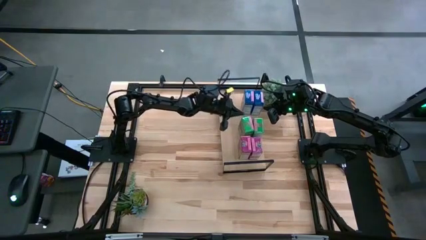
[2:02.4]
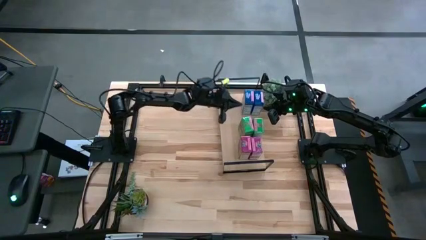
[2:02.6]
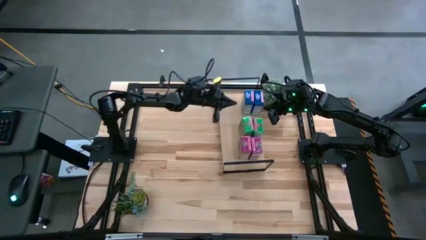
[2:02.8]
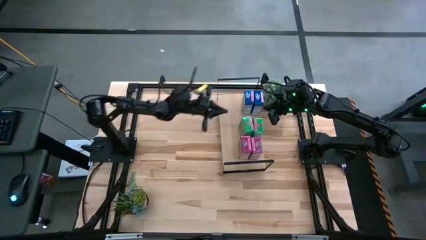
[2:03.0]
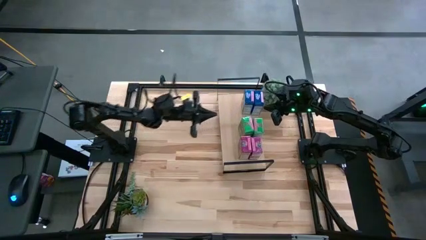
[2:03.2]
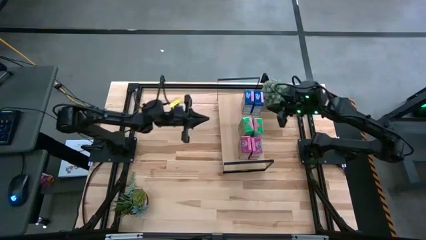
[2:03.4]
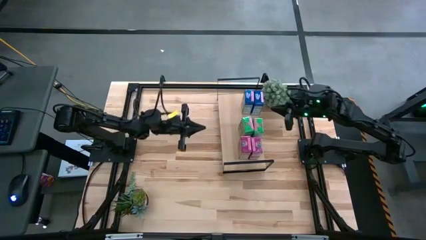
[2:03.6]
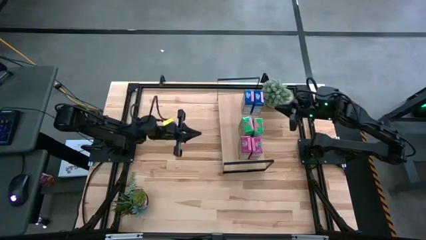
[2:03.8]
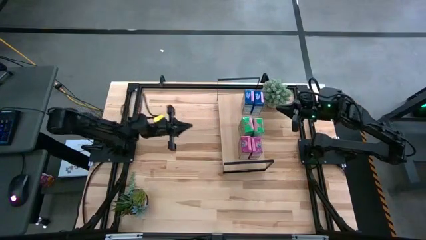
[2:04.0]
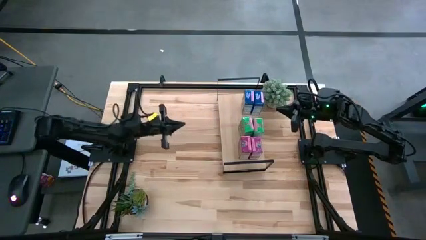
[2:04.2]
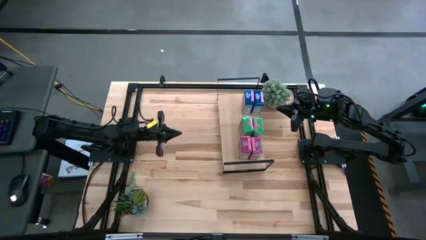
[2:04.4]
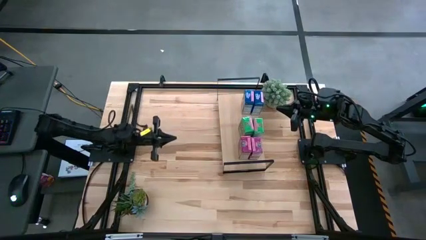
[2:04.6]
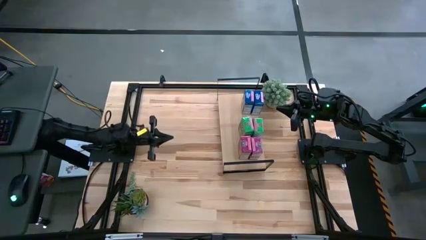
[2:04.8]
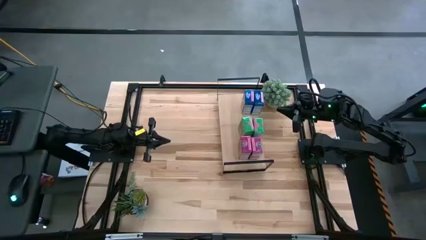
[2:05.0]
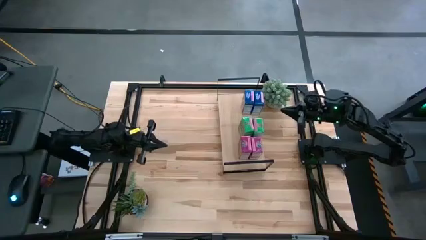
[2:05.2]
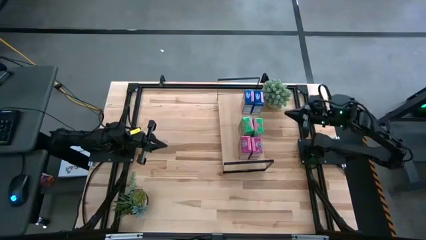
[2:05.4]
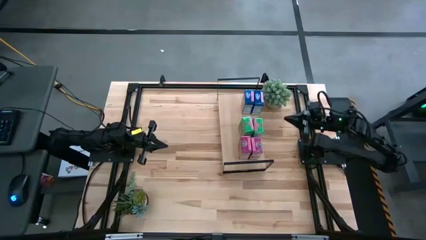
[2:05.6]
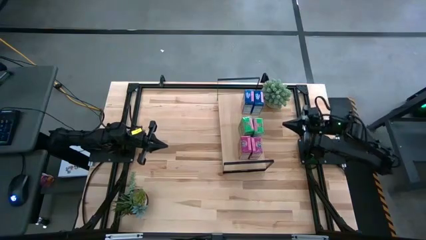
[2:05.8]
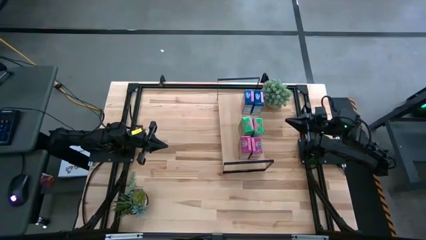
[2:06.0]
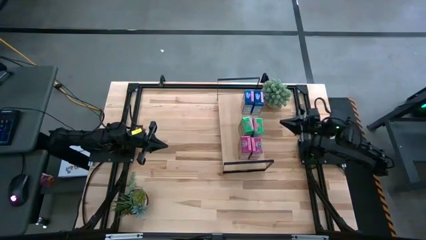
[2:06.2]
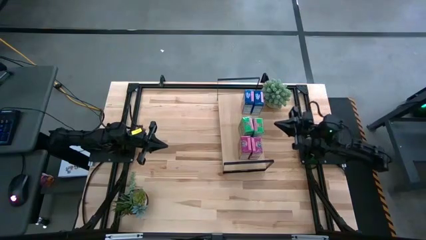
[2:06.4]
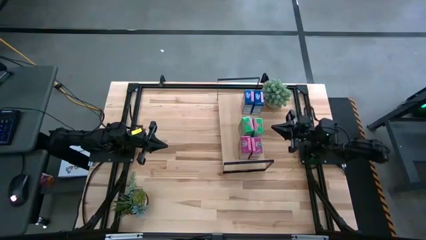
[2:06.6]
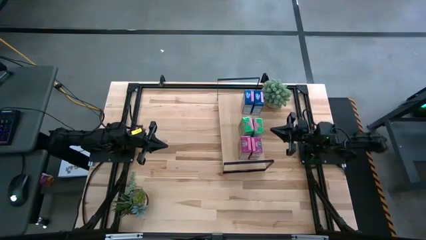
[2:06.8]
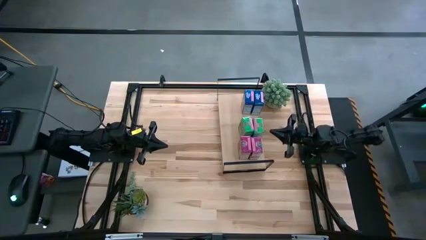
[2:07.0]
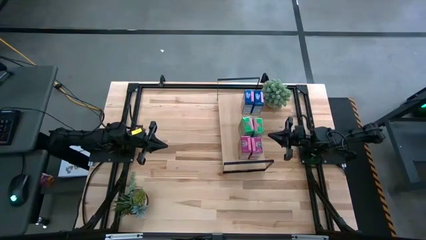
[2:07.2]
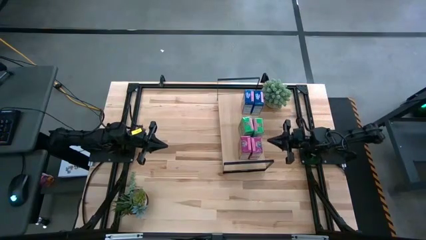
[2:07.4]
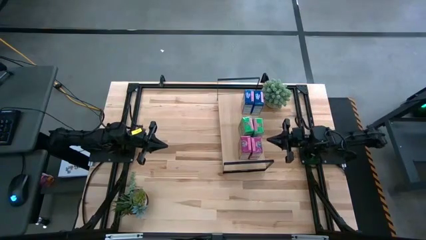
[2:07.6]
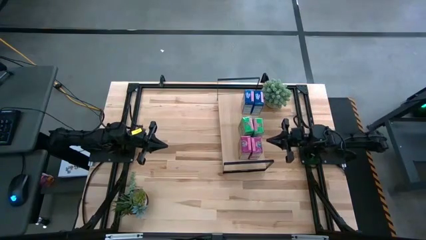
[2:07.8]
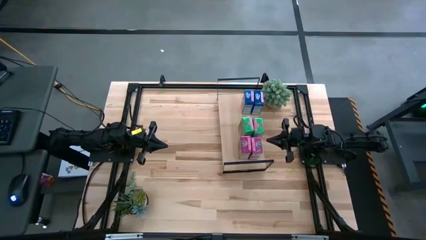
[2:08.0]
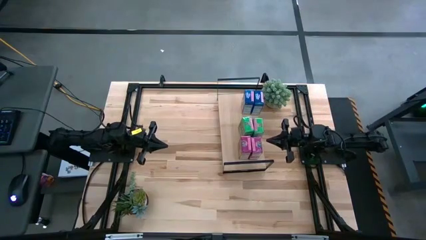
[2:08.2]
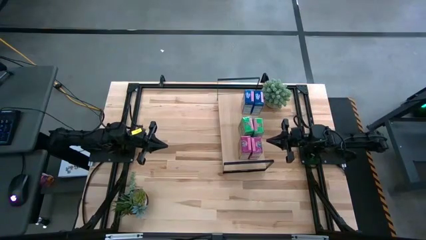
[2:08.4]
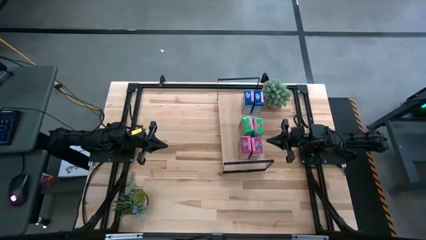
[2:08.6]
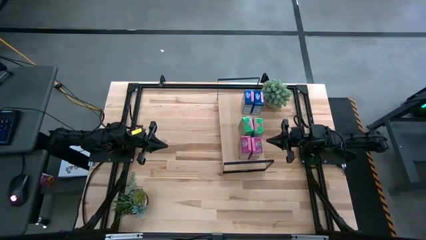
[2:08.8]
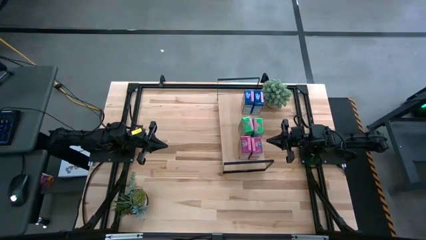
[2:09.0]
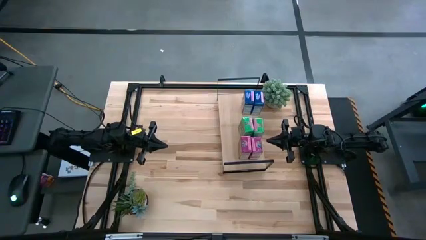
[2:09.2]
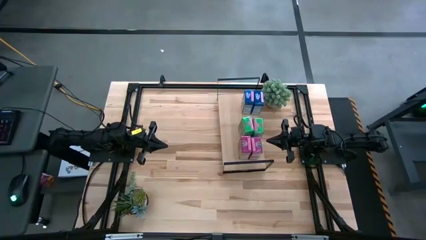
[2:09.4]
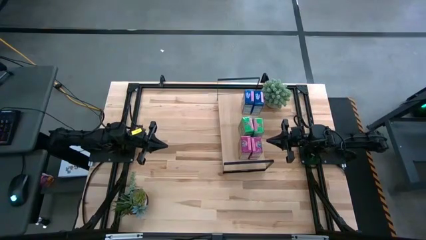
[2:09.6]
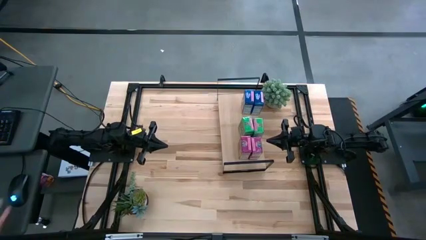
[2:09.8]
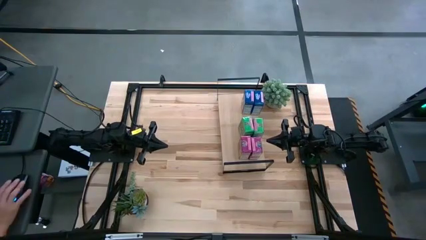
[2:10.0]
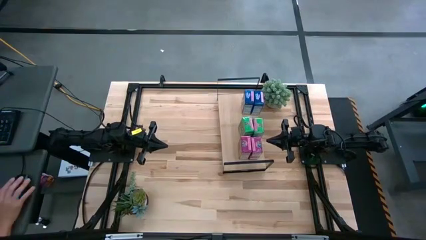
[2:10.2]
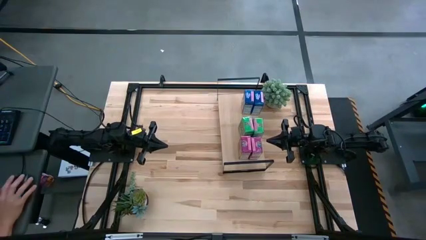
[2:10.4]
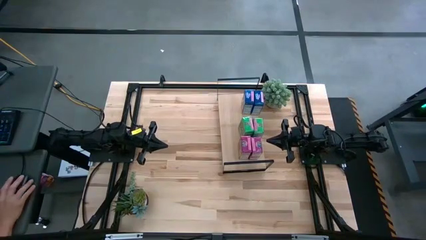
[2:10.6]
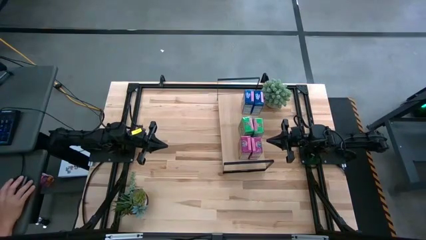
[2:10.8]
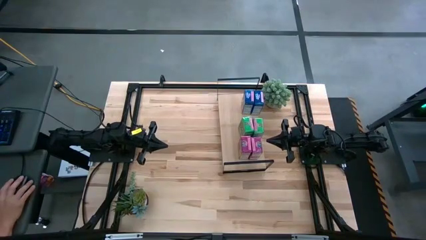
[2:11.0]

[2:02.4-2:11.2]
Task: Stack cereal on shelf
Return to Home Position

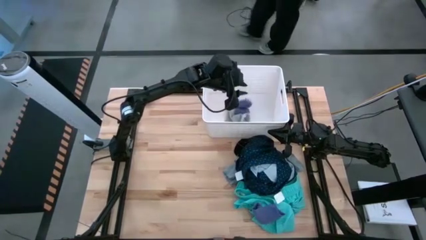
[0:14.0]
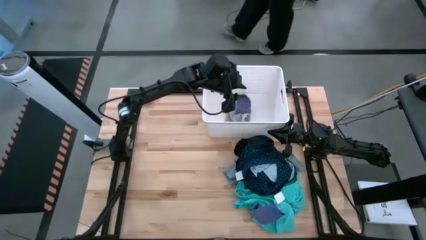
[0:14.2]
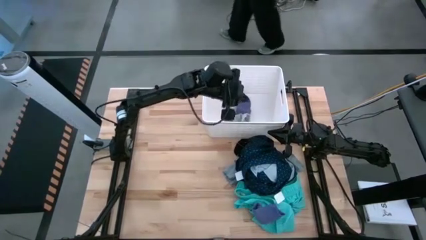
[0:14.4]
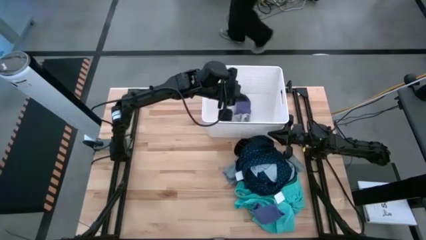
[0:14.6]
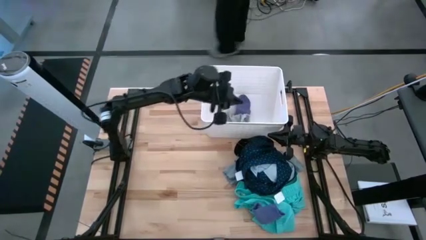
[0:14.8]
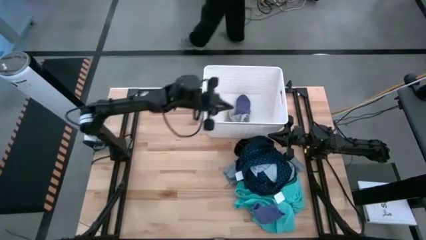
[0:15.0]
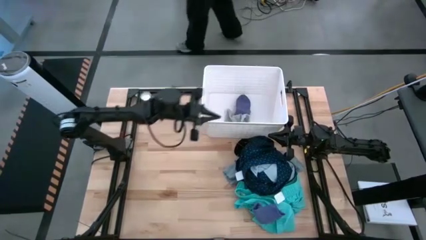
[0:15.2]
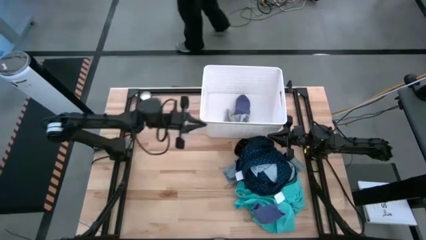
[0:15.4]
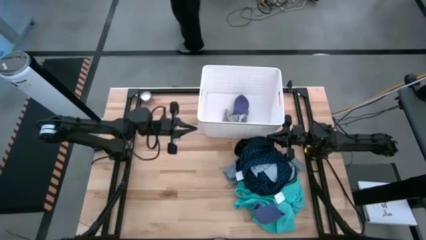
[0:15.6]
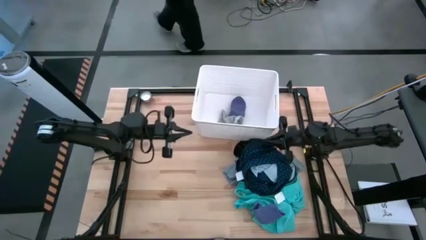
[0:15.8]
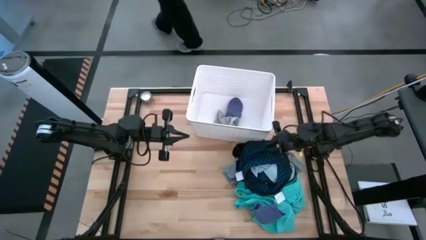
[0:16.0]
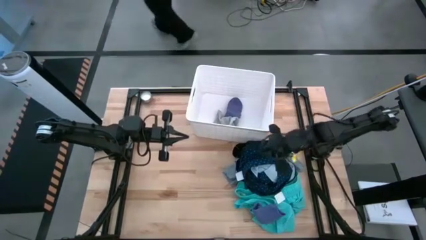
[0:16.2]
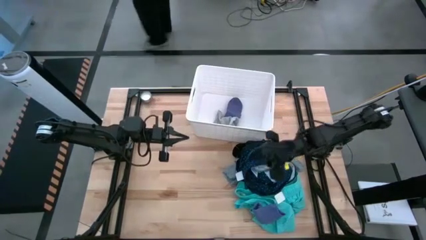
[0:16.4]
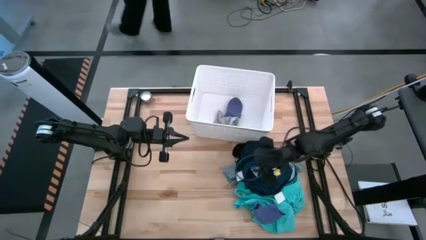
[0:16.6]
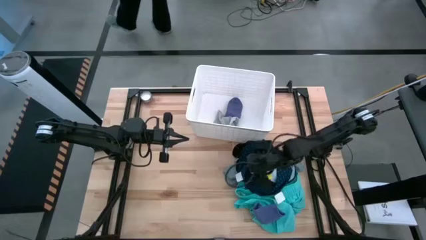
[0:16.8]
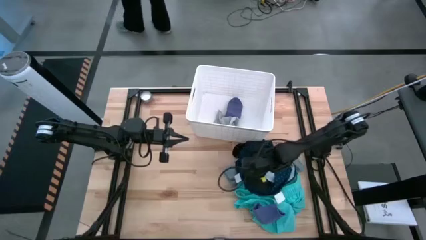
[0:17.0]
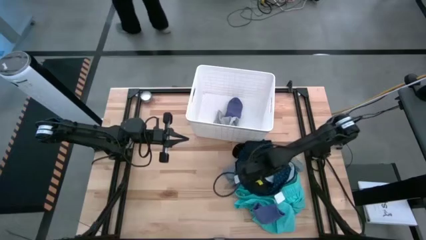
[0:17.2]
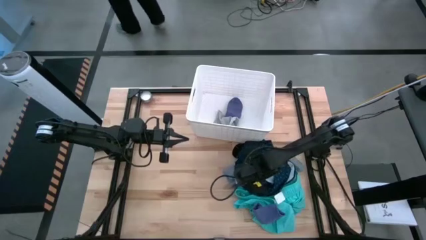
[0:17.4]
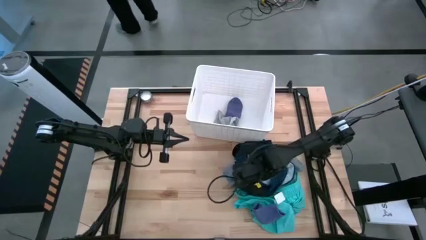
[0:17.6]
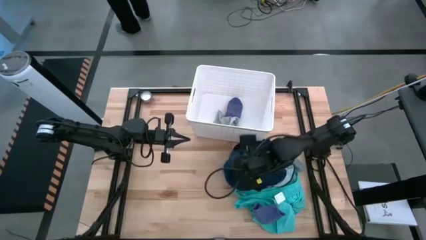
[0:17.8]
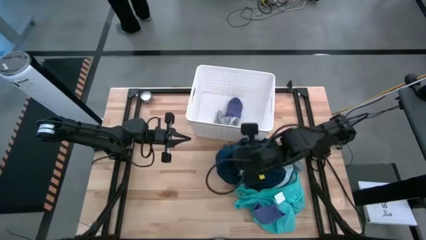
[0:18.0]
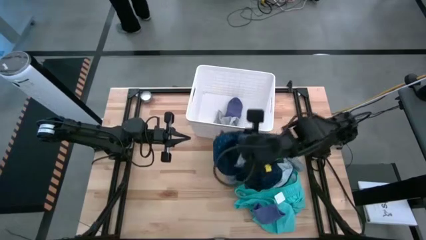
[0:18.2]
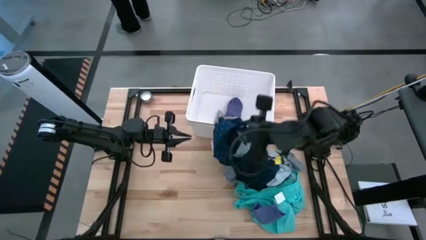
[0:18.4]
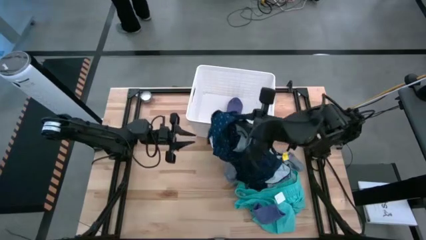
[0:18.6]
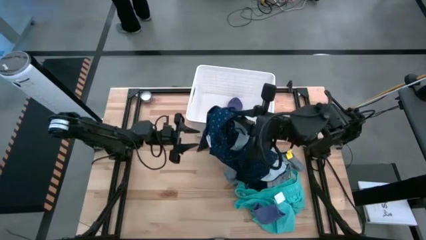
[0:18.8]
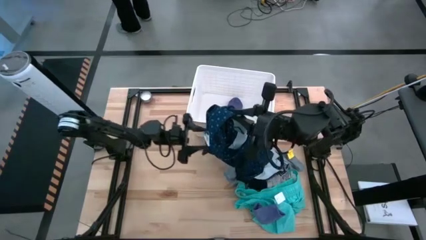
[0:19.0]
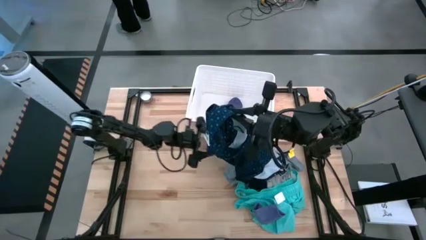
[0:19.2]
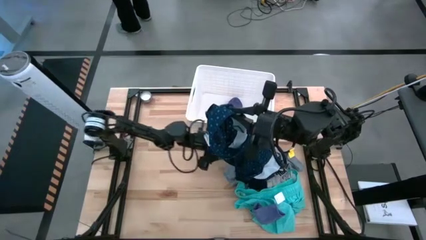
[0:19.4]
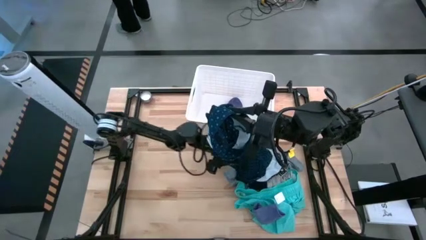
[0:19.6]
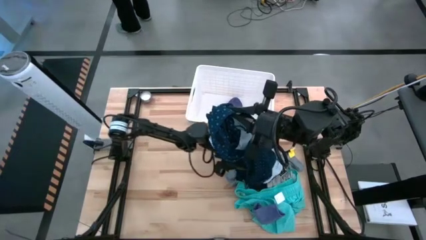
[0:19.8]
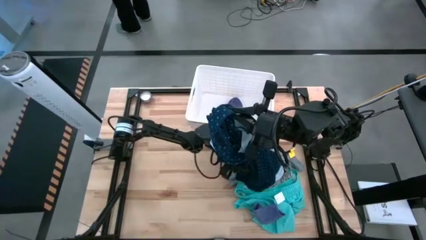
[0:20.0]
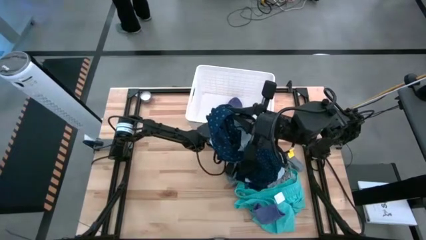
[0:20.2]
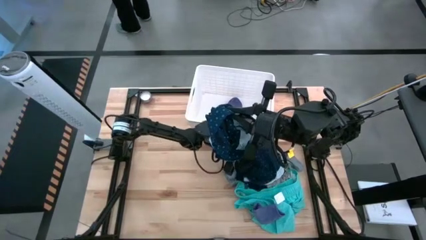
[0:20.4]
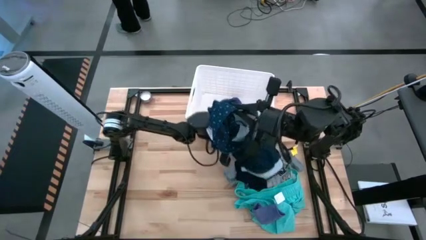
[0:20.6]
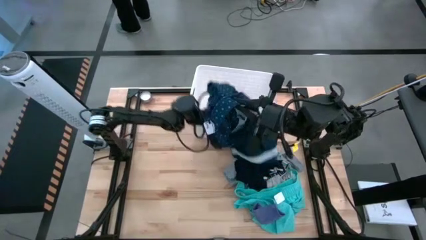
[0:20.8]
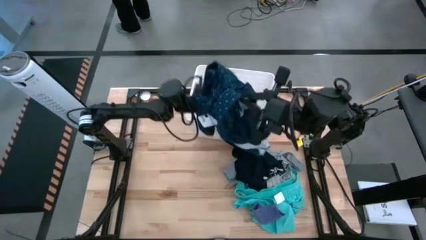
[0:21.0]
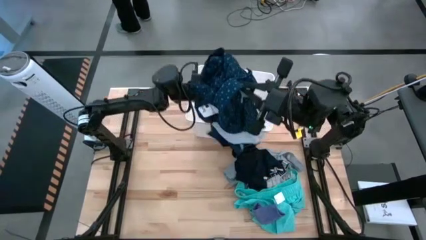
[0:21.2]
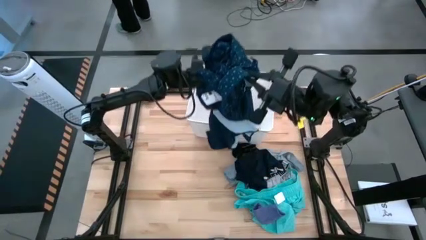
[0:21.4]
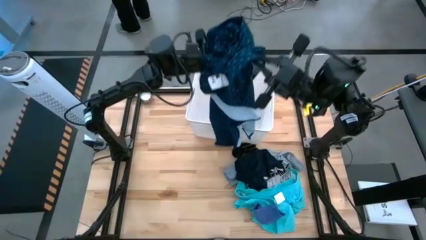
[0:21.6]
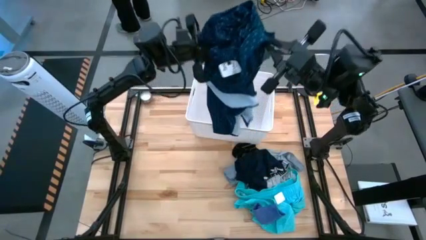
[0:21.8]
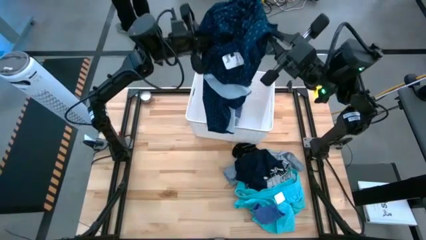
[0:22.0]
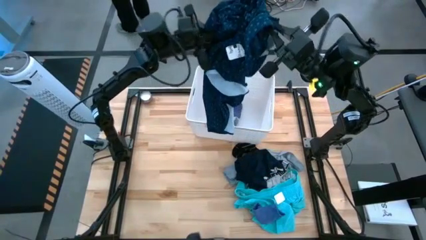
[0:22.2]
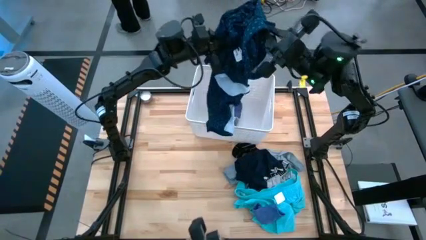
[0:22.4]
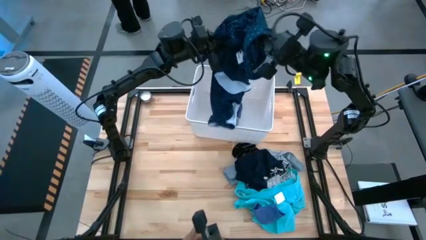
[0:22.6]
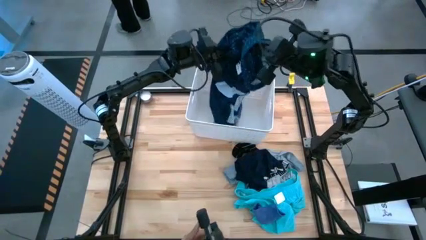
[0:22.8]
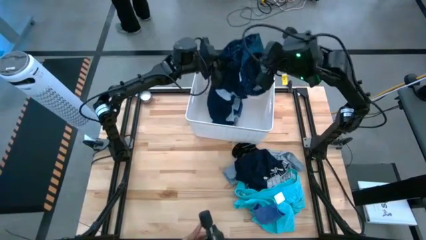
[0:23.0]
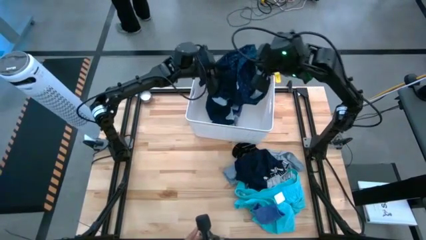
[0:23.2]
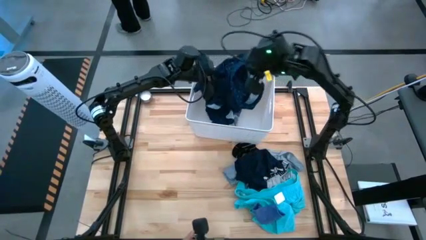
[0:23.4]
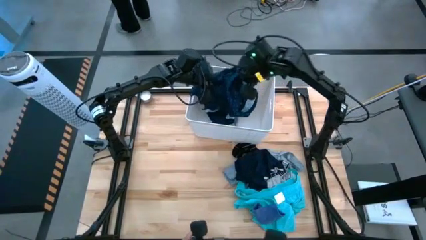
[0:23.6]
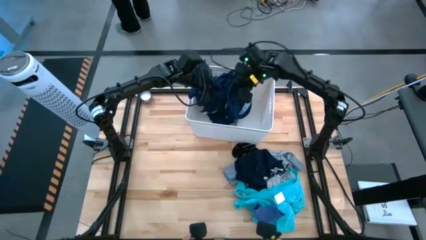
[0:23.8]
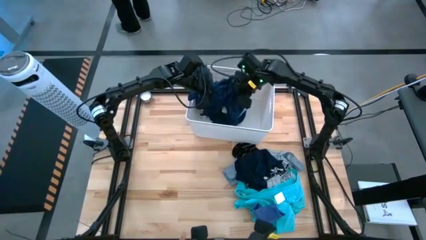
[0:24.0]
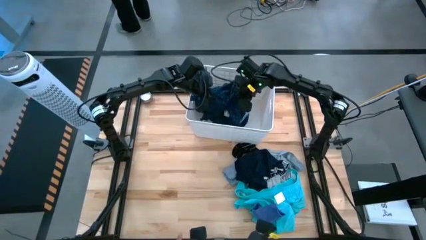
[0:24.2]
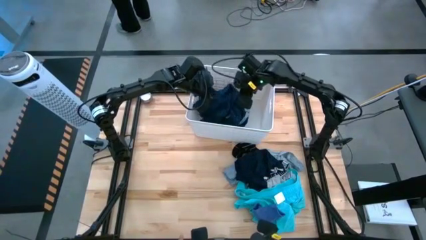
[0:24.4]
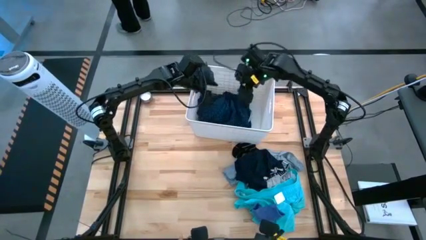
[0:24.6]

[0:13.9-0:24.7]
Task: Sort clothes
Put the dark blue polo shirt into the laundry bin
